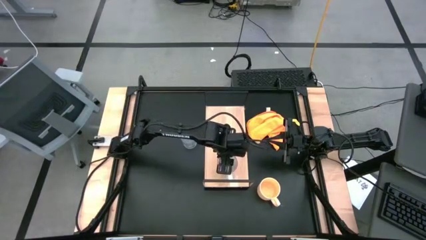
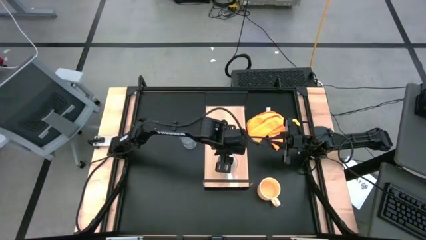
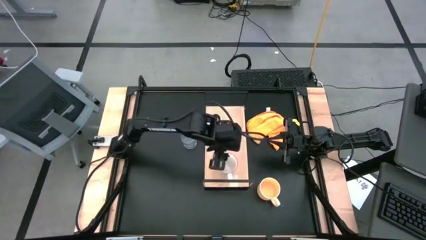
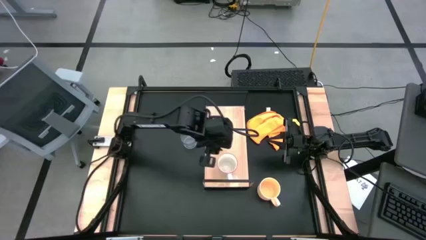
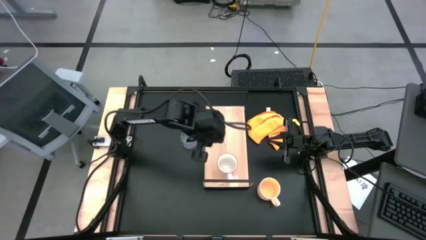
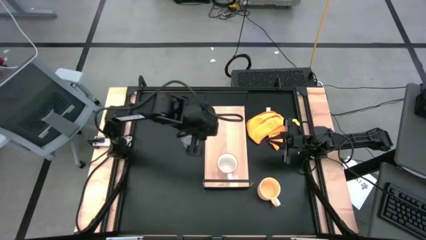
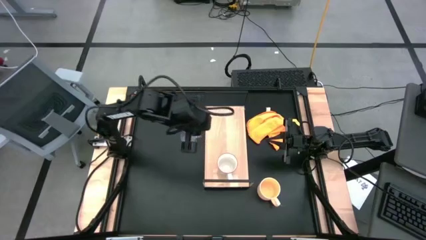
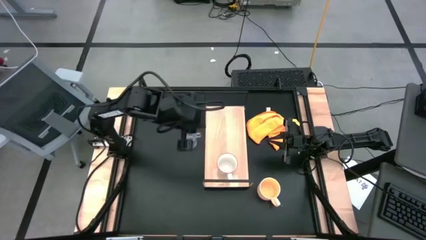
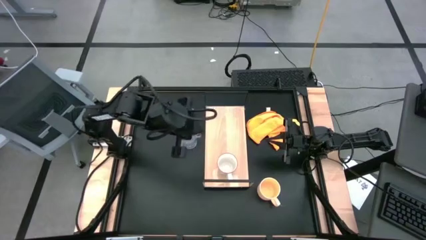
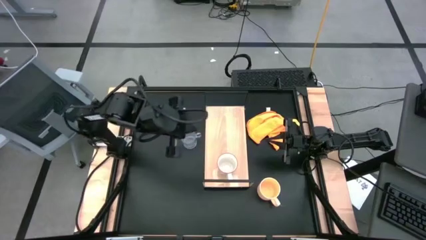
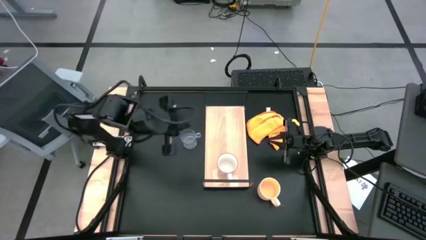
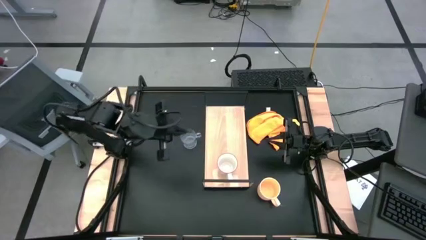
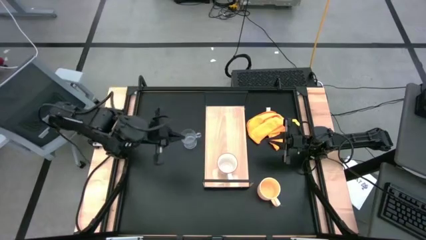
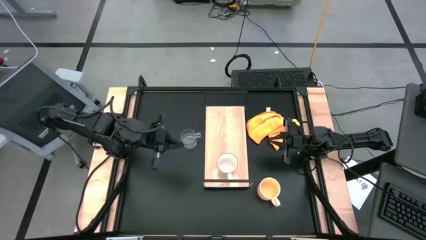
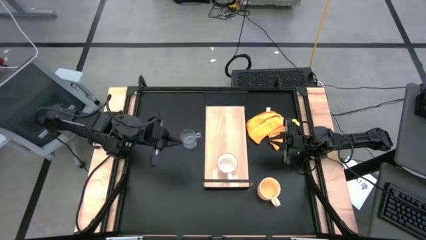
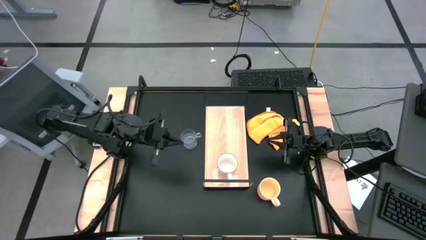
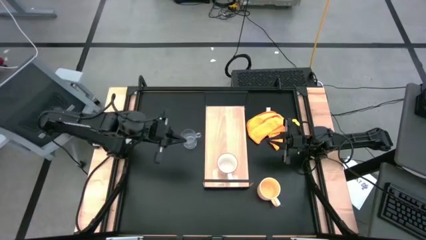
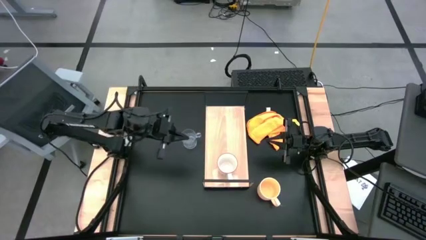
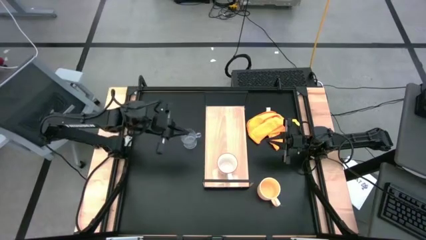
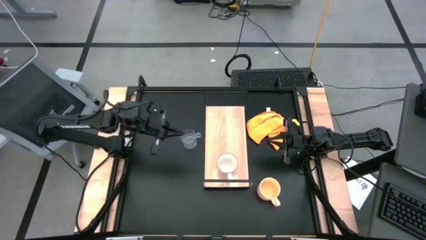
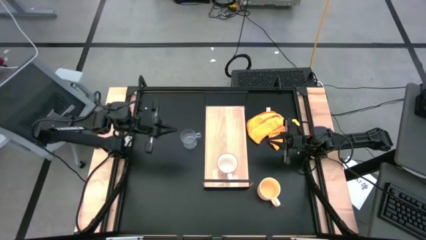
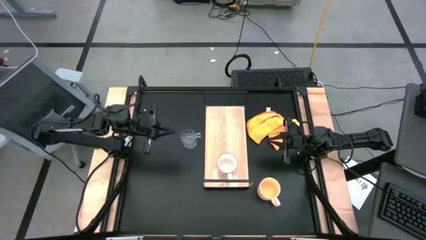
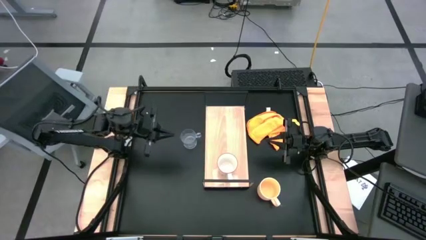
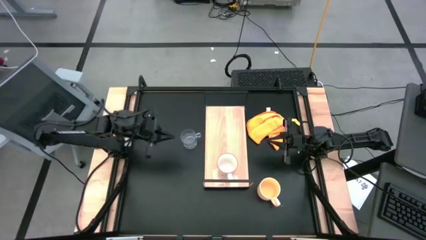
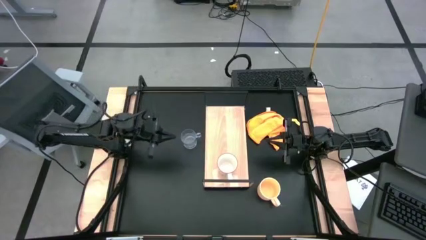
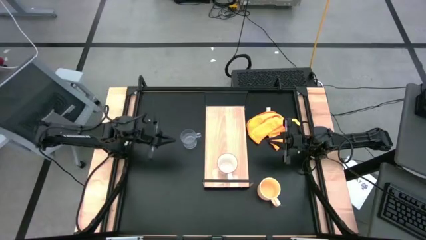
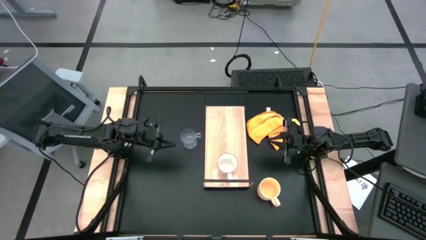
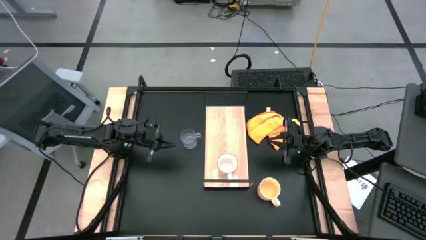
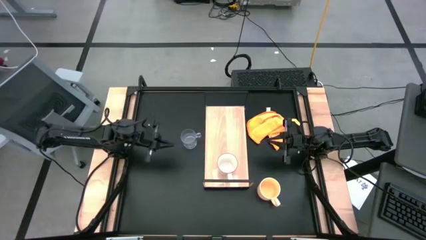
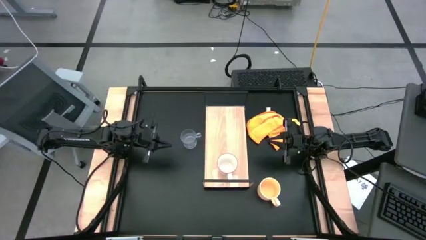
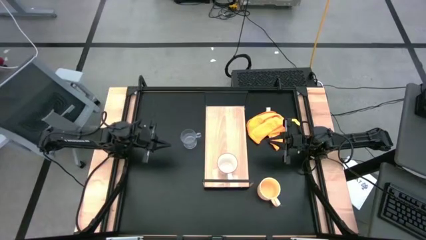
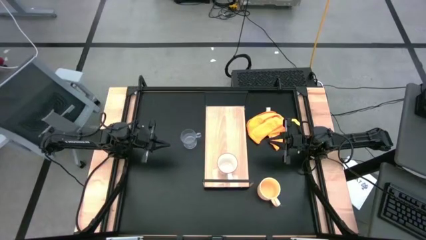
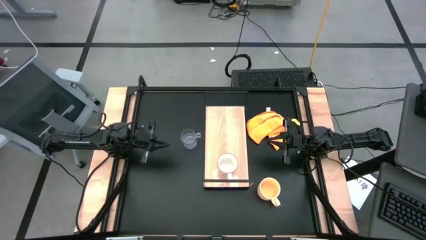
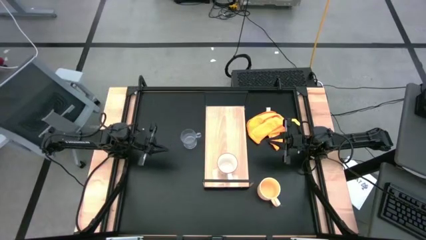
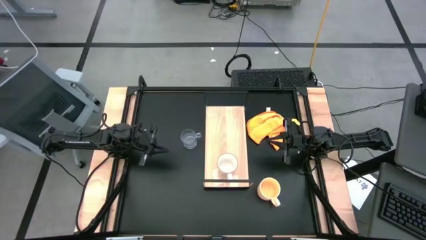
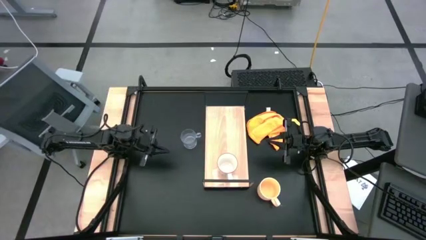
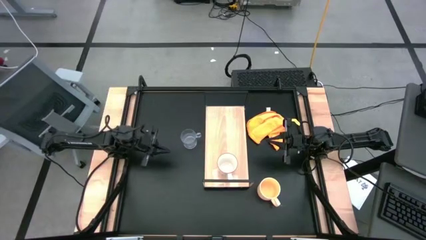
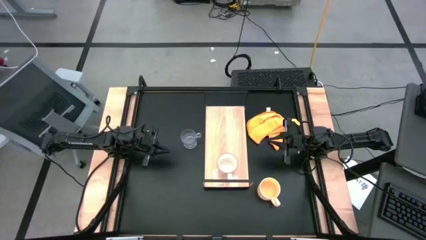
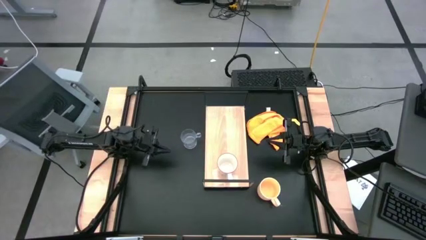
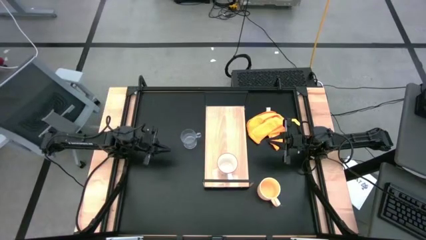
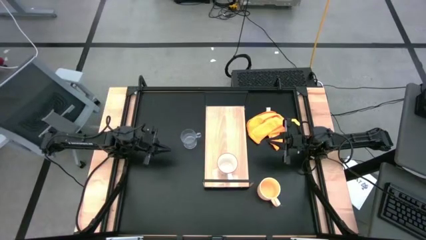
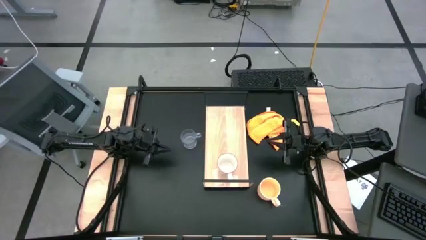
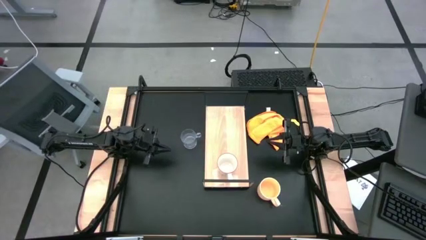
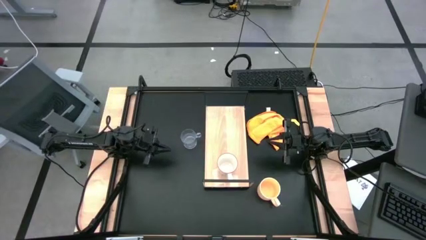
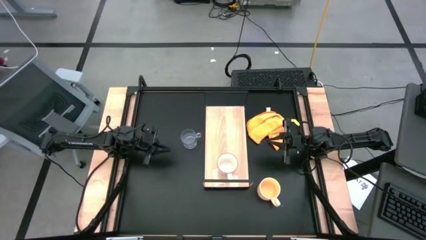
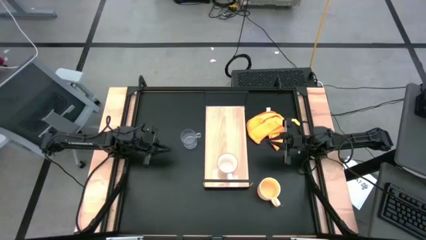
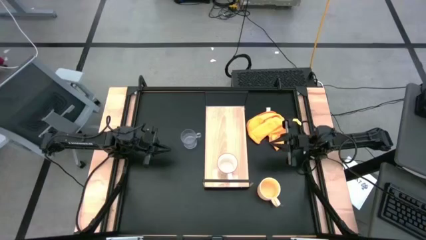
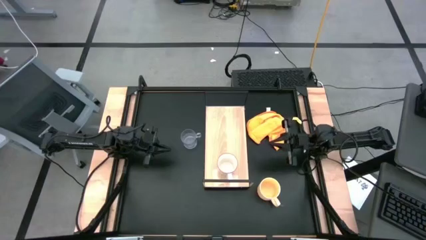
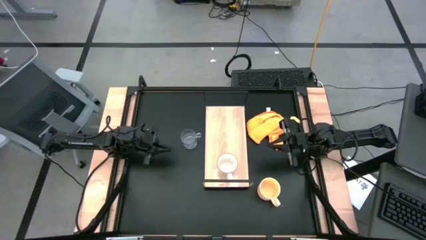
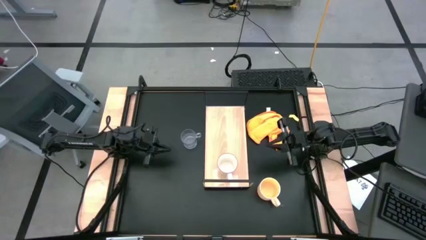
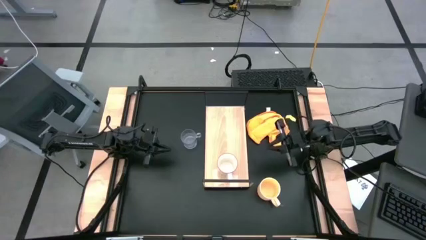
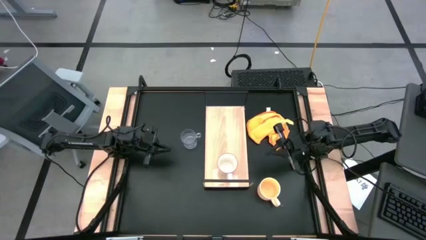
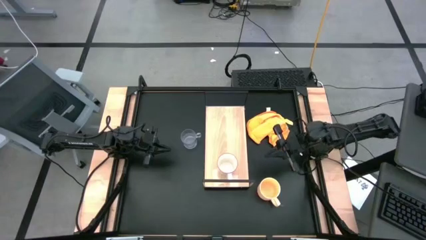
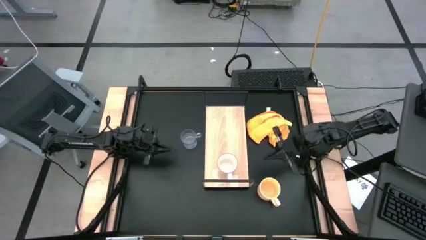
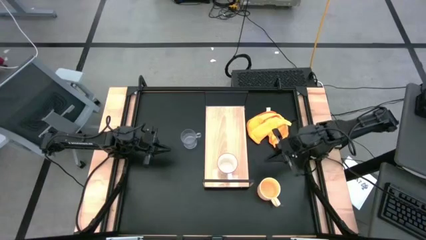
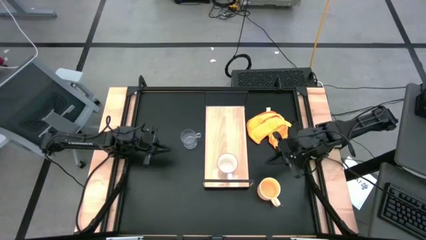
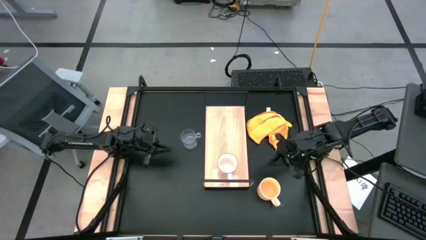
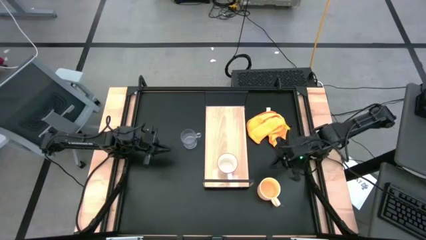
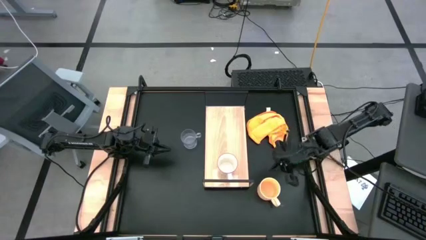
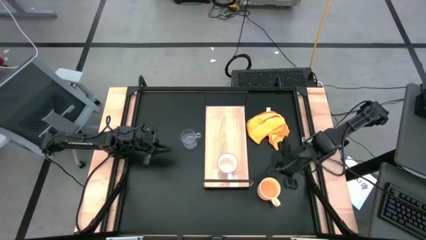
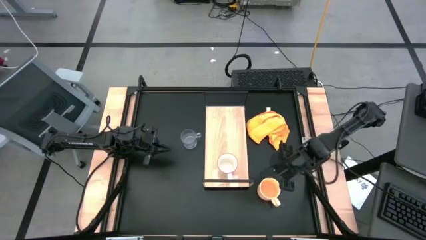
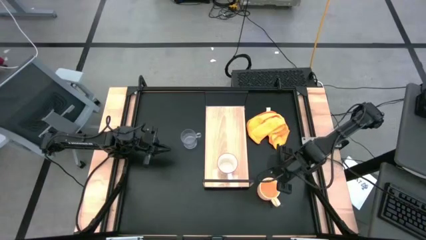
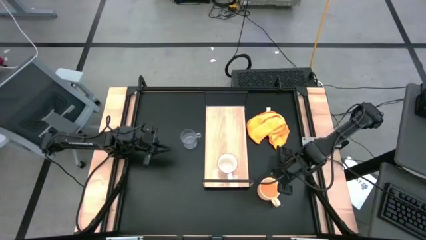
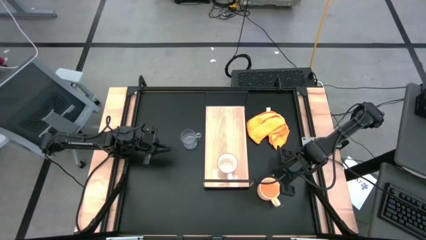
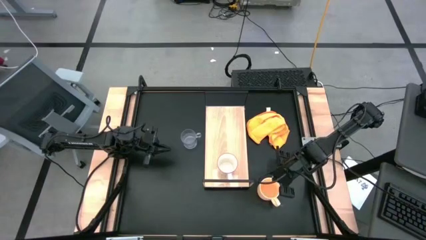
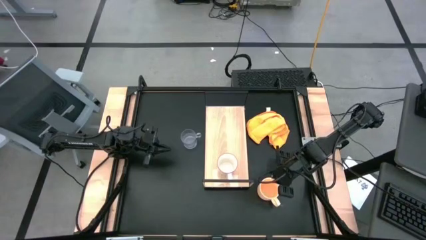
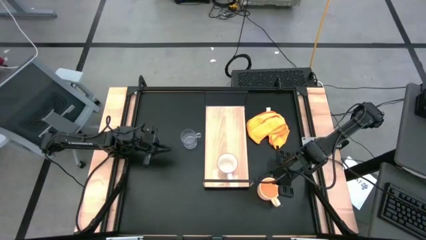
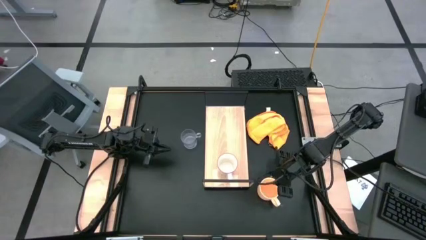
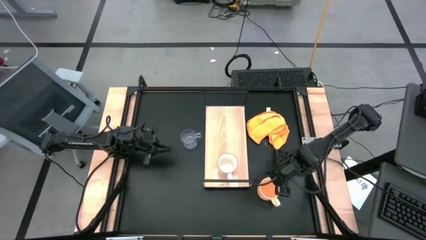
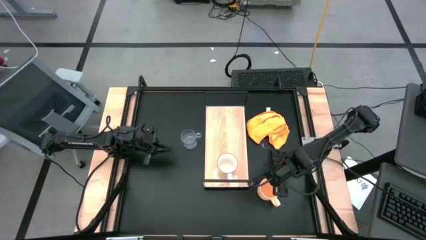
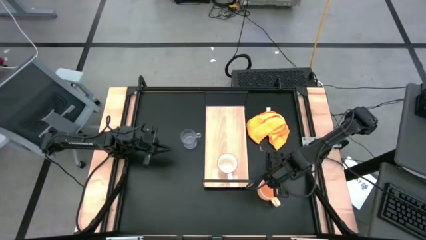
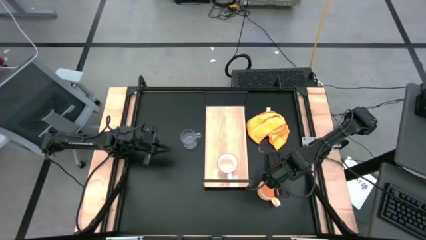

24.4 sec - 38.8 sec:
Task: Stack small to large cups/mugs on shelf
Put the orange cup on the shelf
